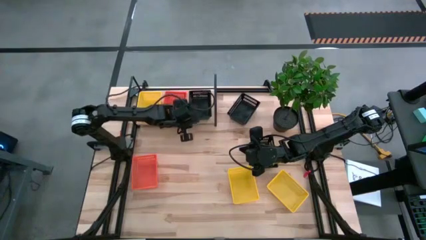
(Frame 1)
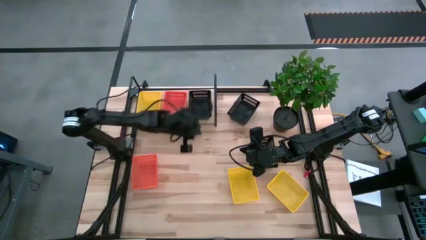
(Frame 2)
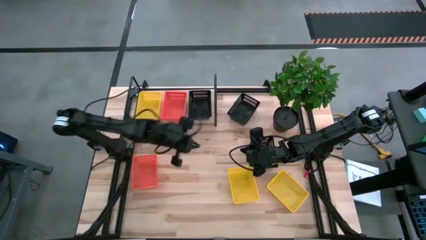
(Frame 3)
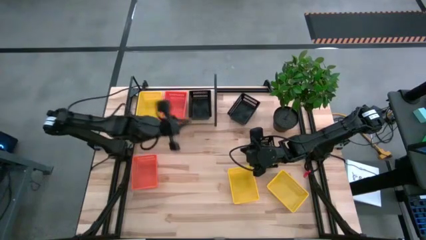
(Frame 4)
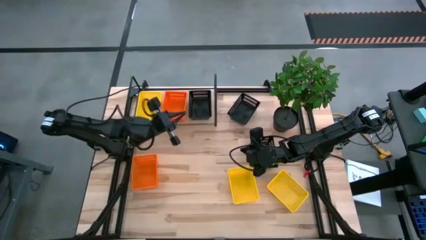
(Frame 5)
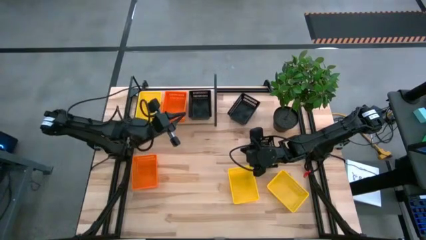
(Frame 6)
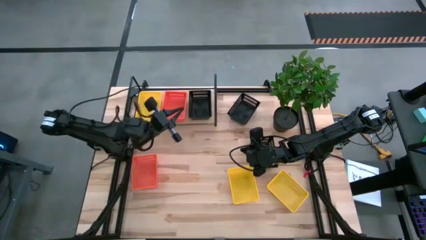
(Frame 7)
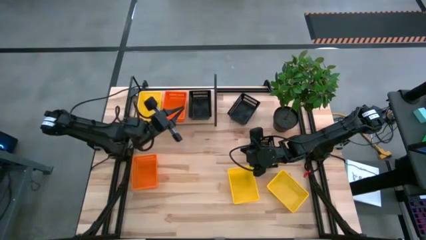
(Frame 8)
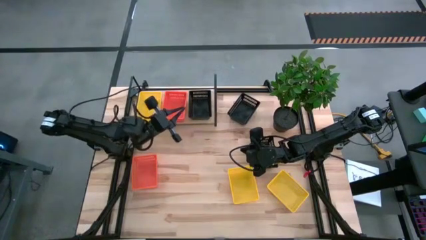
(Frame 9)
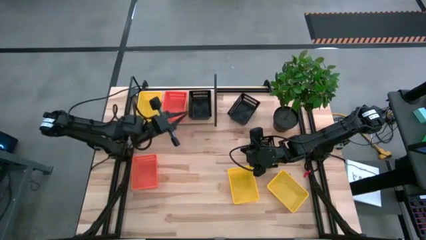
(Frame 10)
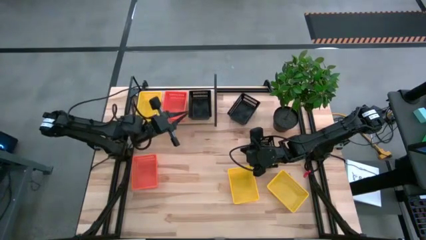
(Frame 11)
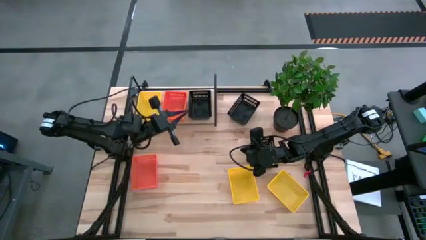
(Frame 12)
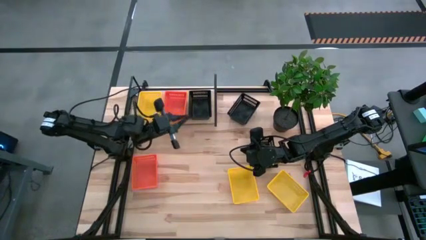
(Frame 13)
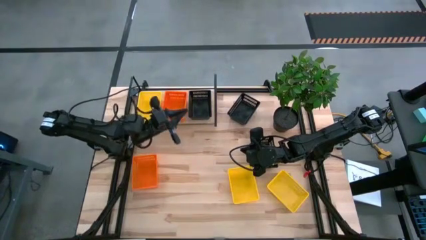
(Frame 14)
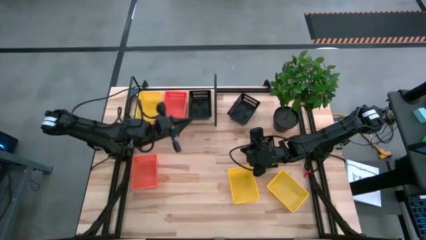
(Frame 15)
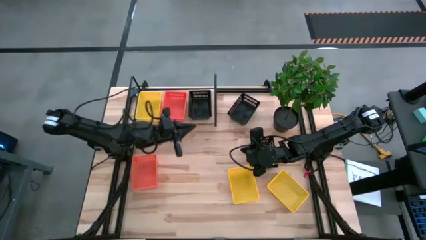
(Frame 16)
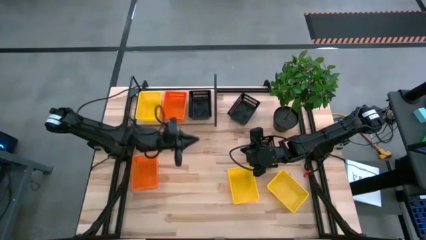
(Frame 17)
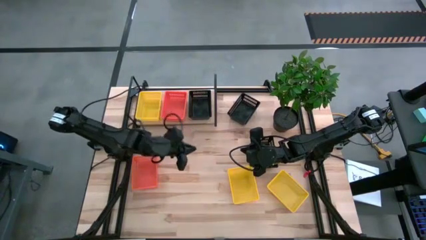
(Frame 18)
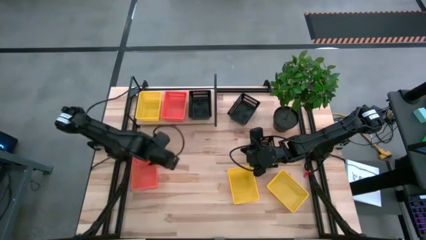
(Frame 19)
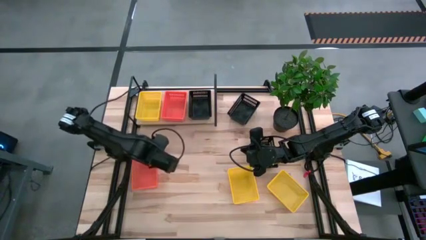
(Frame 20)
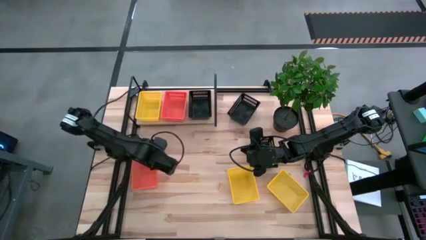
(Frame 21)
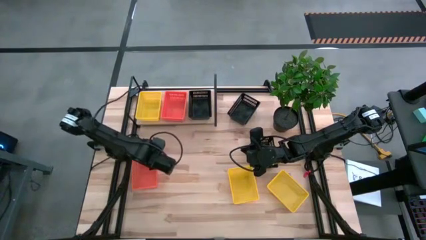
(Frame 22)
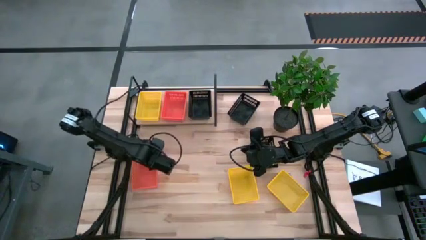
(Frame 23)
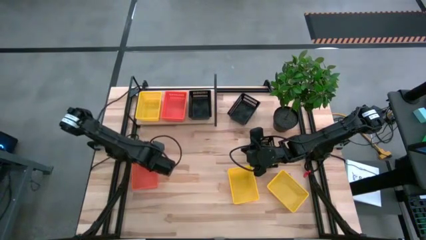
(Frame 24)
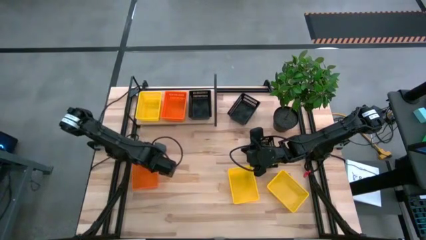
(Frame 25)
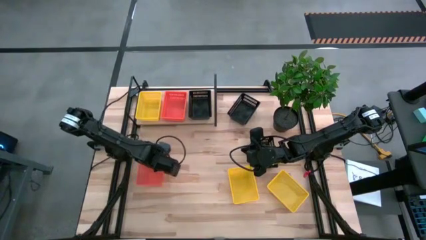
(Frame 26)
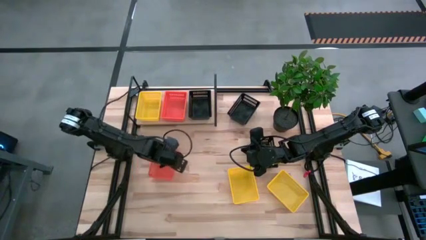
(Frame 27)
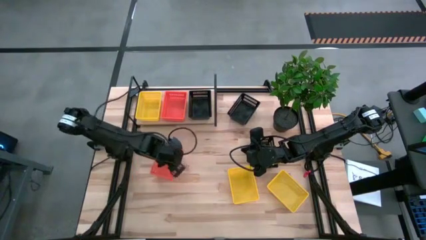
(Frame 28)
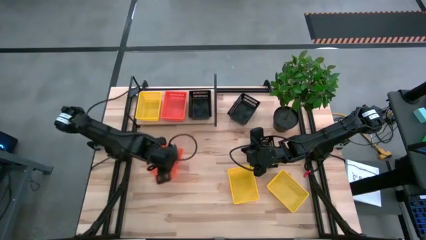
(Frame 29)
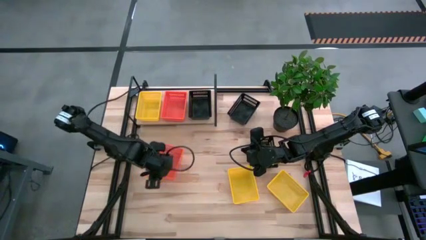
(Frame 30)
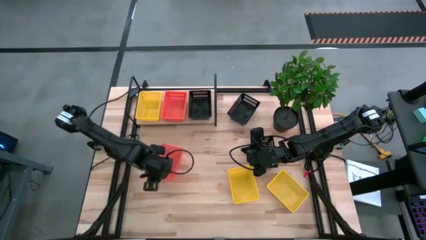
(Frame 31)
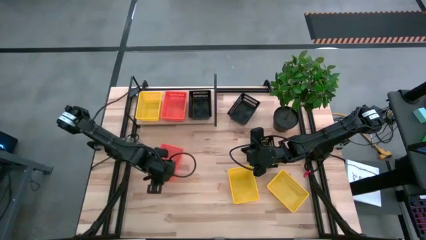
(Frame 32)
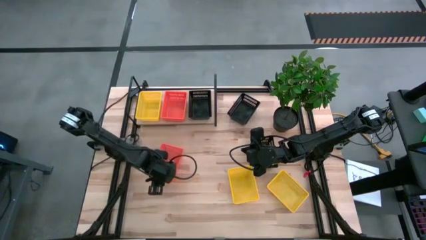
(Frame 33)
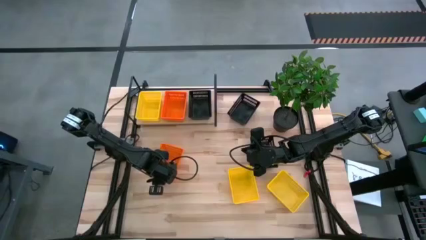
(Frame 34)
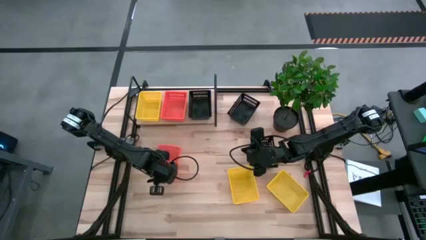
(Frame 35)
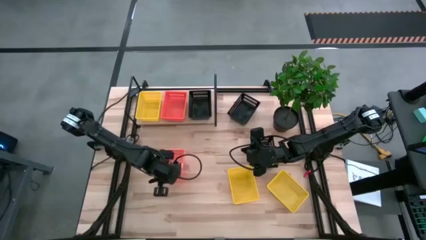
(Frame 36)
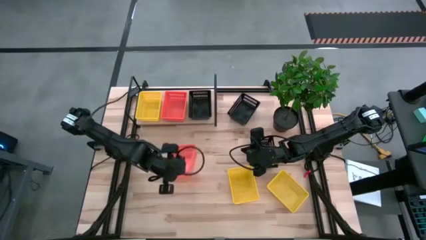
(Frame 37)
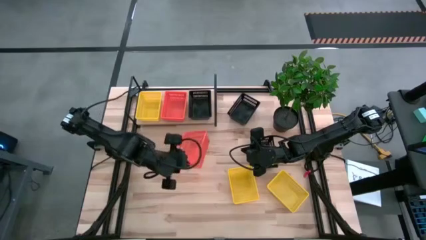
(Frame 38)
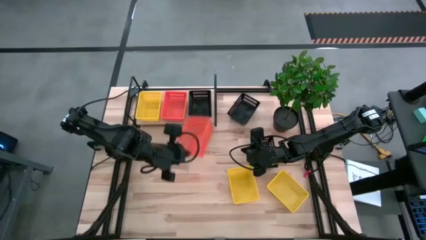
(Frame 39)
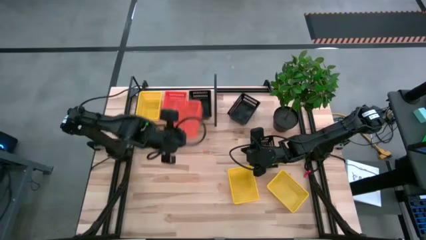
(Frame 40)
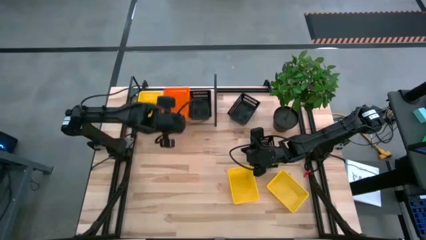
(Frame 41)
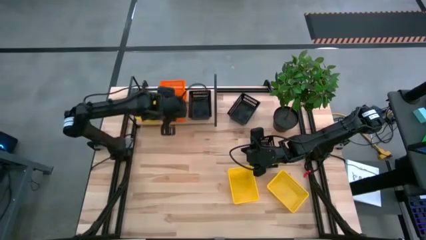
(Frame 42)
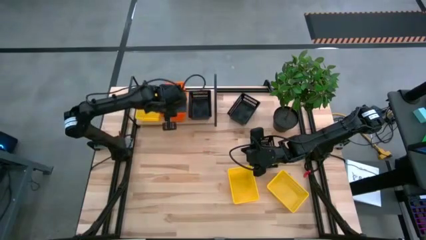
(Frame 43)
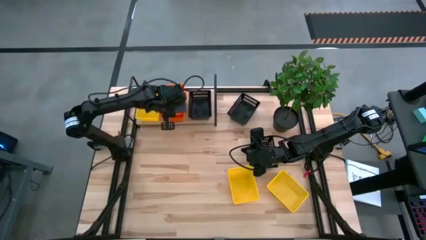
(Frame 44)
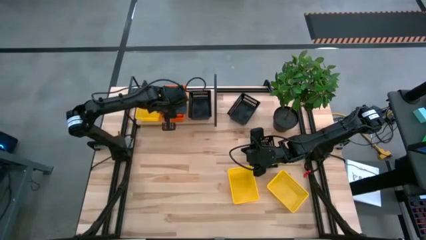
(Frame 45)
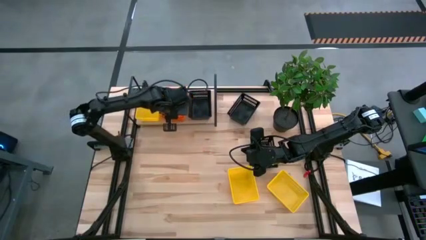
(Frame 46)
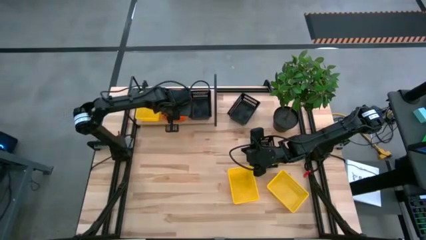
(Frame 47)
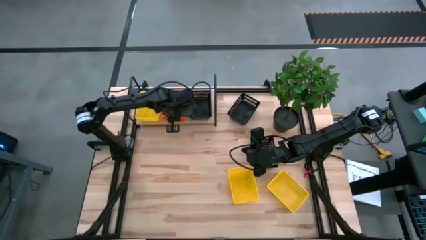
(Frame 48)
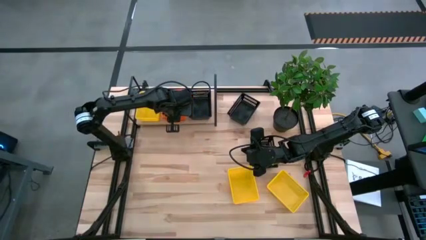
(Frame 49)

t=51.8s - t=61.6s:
Task: Stack baskets on shelf by color
Stack the orange bin on the orange bin on the shelf

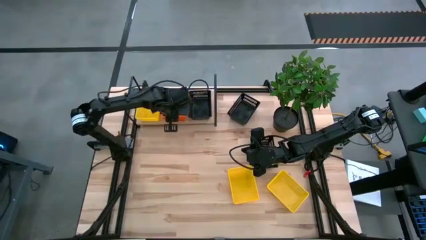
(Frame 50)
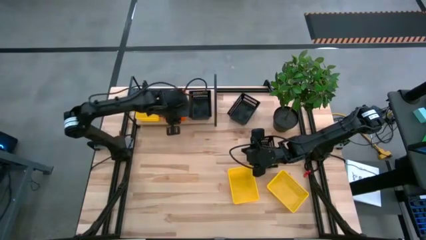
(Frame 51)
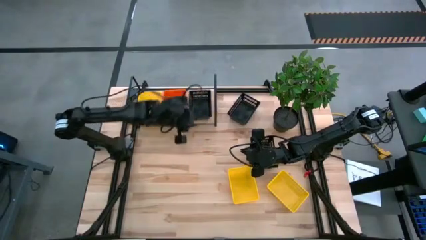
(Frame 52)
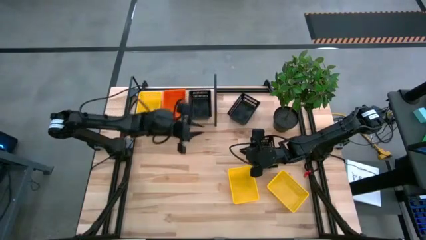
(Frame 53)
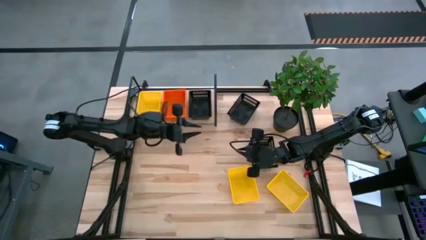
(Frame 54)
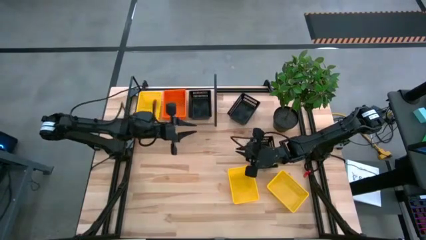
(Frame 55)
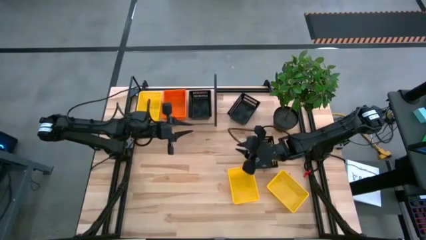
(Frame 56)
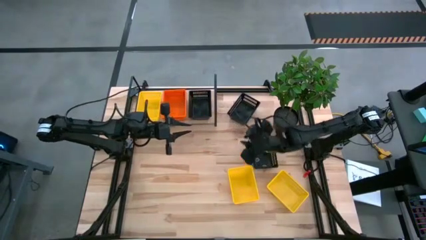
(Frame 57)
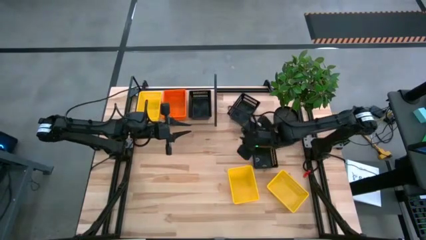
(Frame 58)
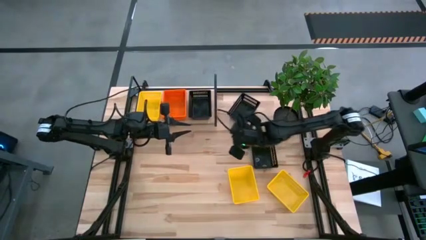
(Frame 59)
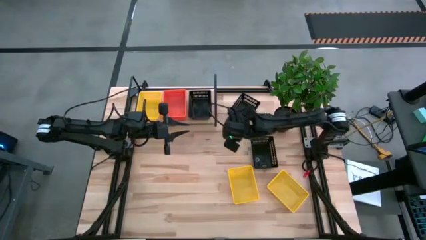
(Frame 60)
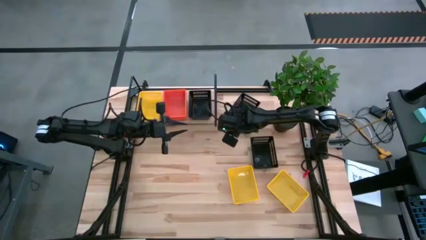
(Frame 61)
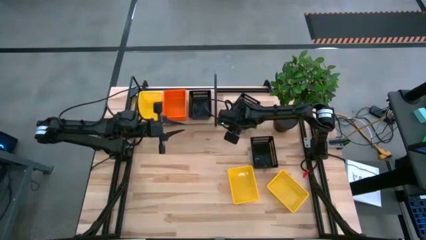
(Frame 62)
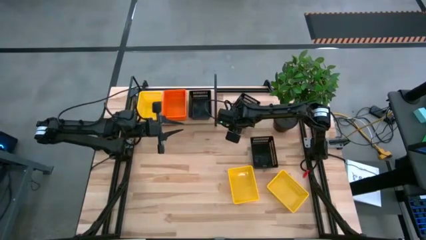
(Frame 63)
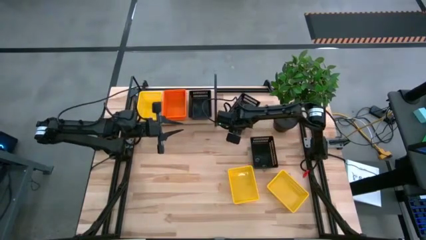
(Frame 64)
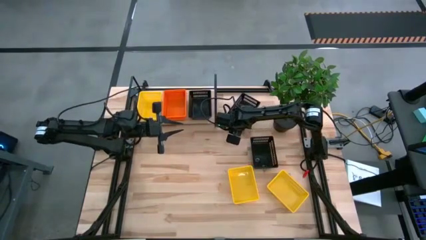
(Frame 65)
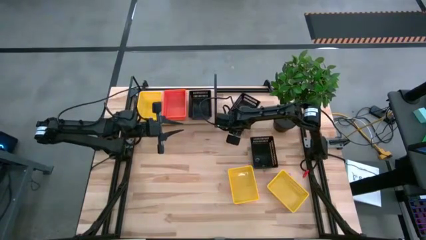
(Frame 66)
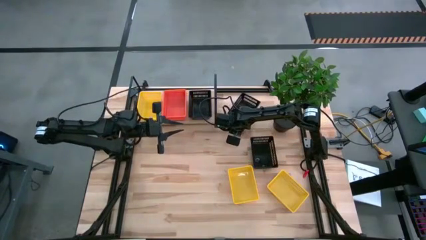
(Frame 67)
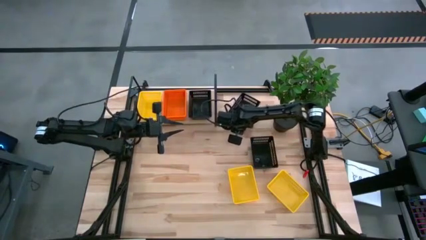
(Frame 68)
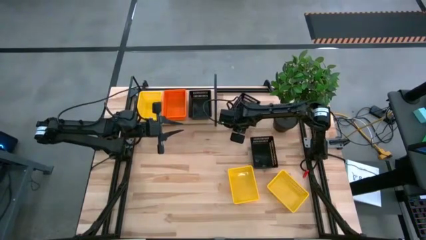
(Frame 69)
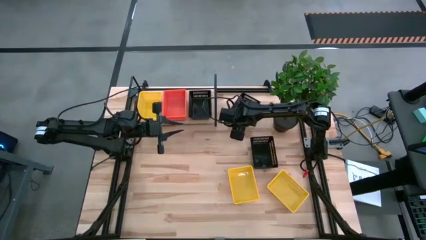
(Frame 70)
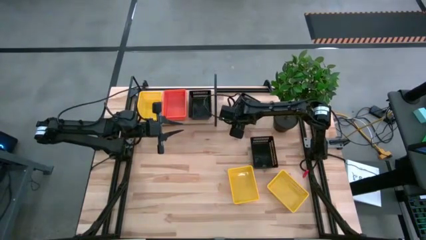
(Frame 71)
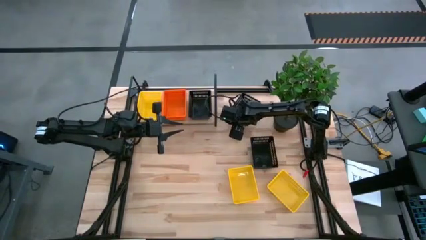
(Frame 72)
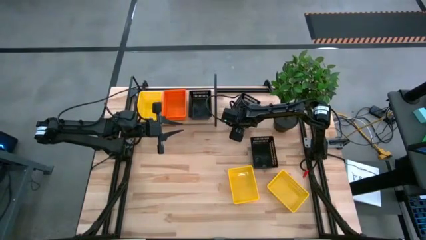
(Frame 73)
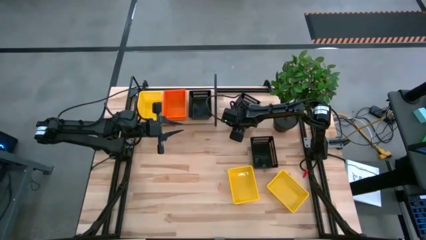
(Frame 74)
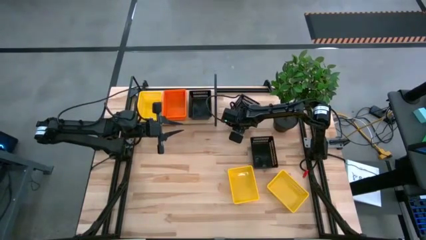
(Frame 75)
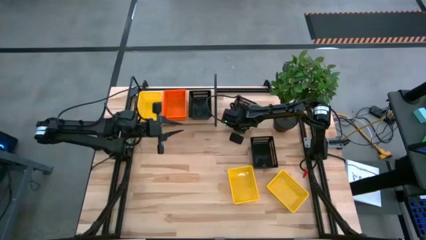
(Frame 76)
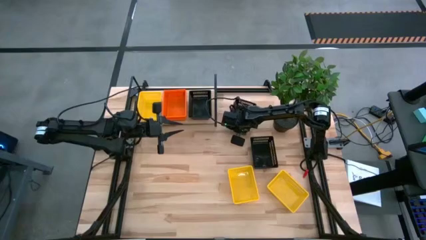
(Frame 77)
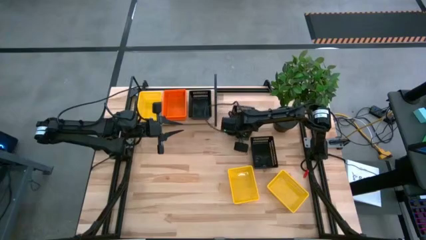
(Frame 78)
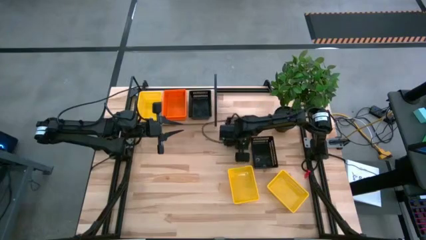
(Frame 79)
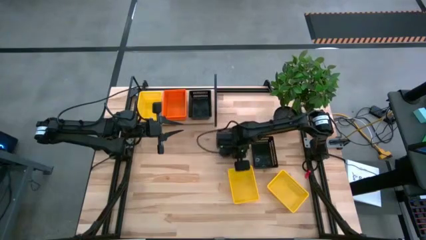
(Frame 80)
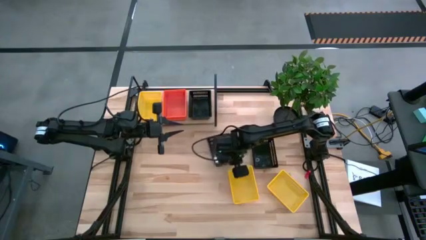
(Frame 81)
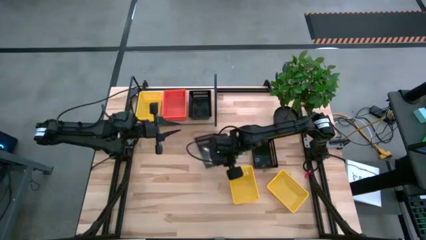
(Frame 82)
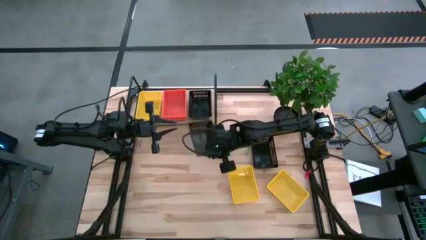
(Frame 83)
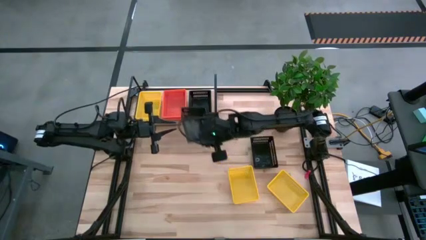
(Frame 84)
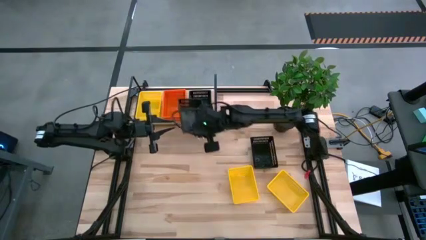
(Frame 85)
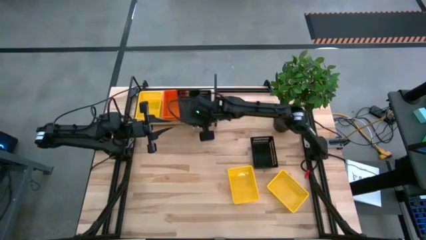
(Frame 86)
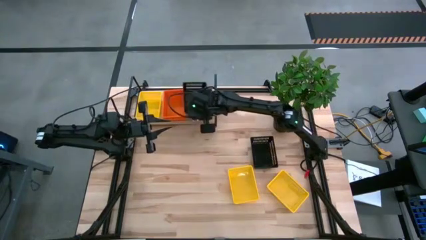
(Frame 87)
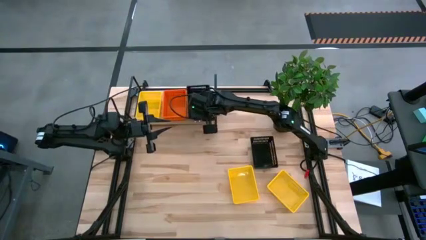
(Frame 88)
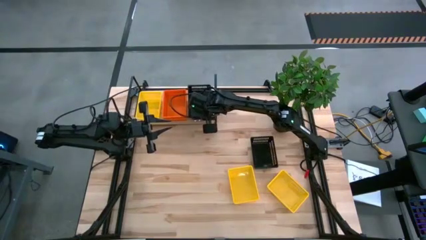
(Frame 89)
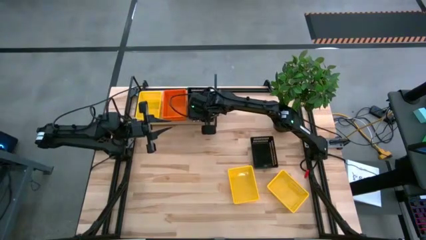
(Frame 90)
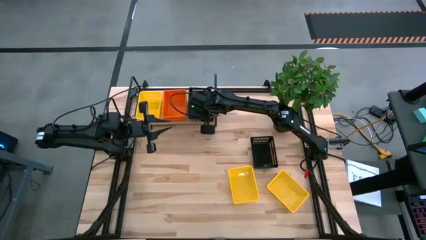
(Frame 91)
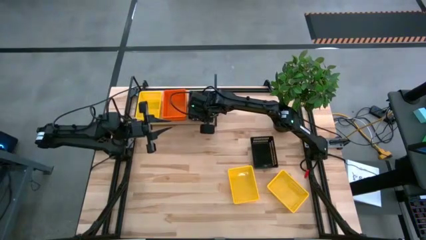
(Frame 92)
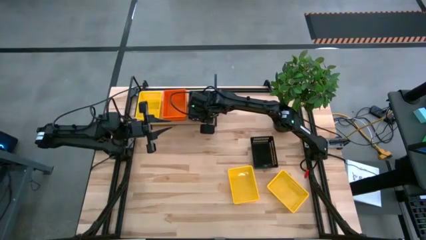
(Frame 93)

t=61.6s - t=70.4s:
Stack the top black bin on the black bin on the shelf
